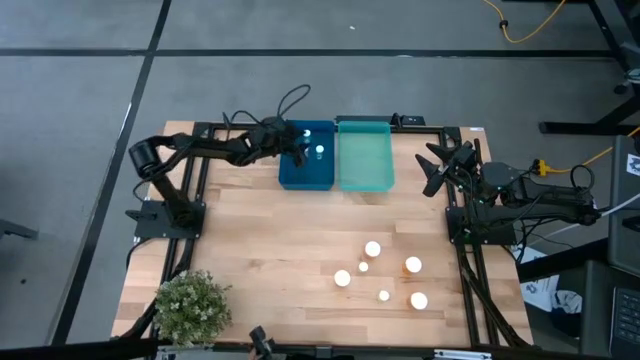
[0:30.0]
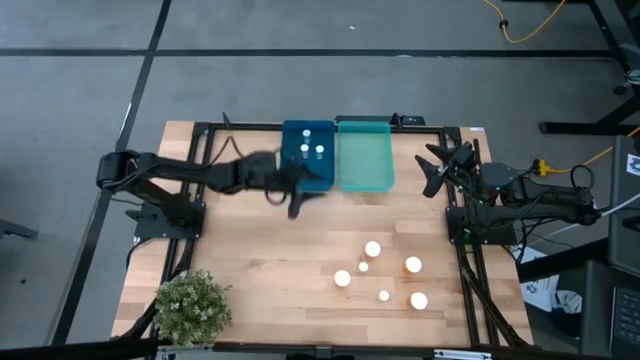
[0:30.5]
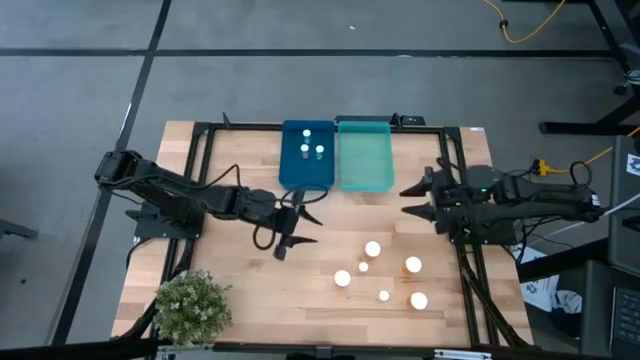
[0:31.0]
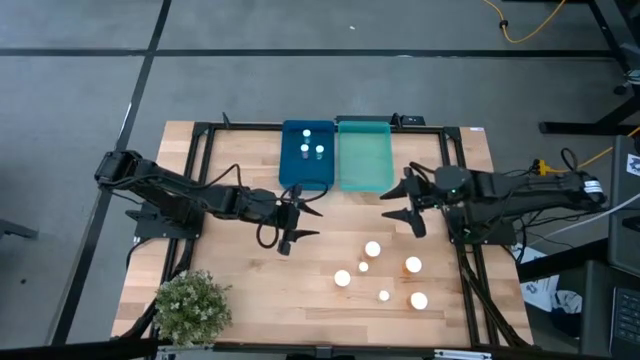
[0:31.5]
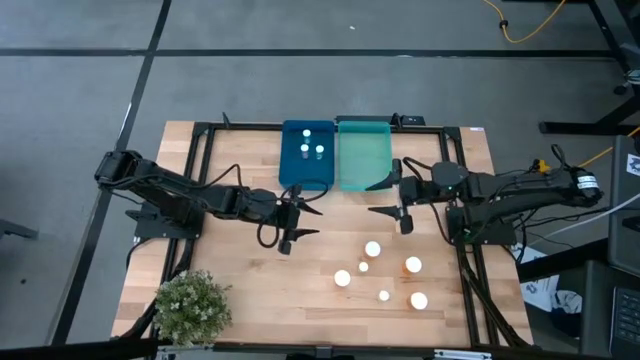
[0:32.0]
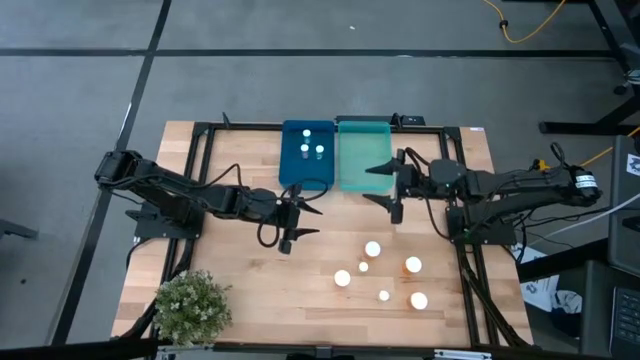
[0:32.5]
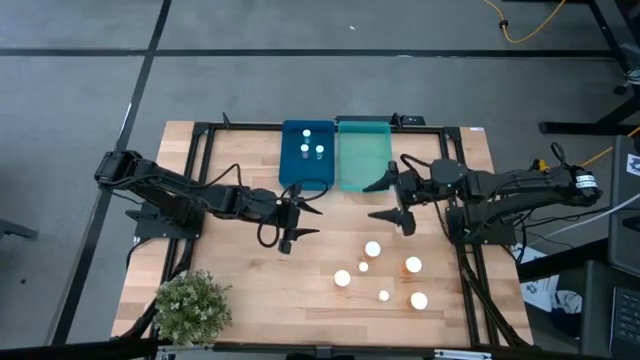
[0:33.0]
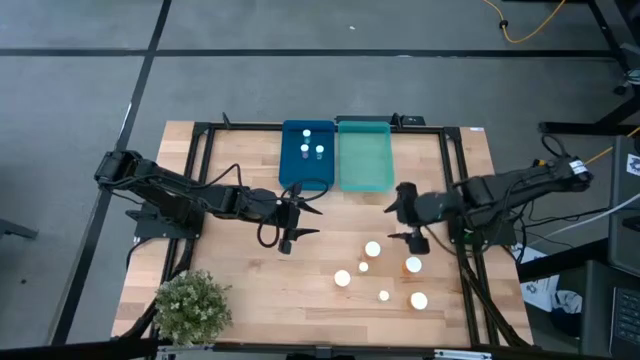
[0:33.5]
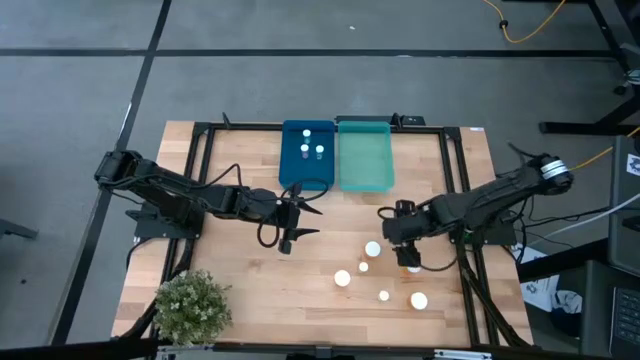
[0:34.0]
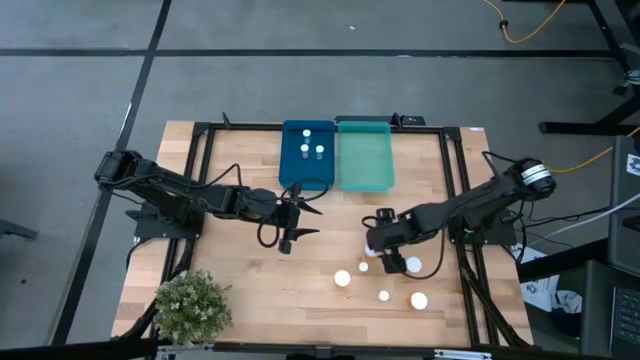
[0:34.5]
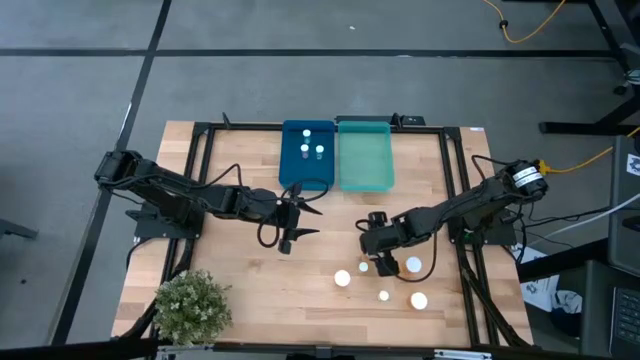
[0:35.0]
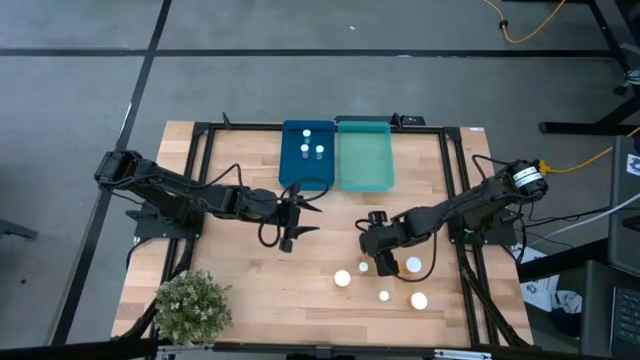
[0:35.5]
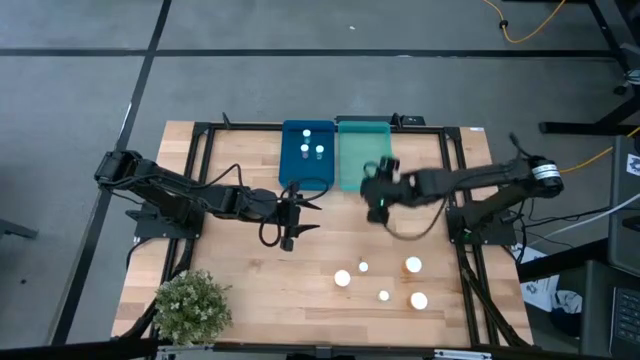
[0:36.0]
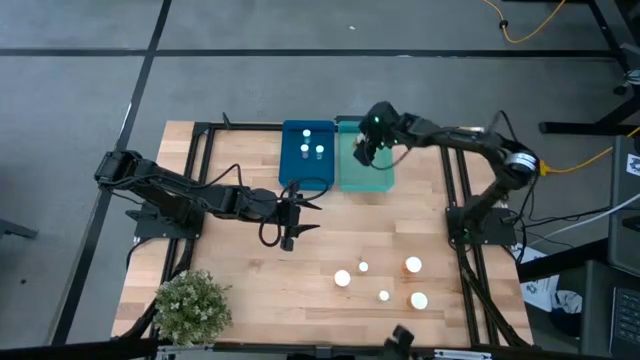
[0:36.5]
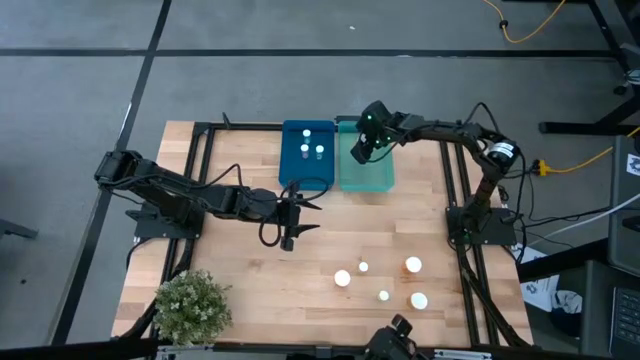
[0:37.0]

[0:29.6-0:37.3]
Task: Pick and place medicine bottles into bin by pill shape (circle, oval)
Put the orange pill bottle into the light blue bin

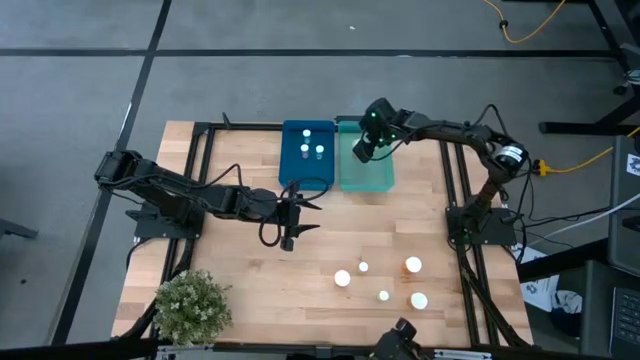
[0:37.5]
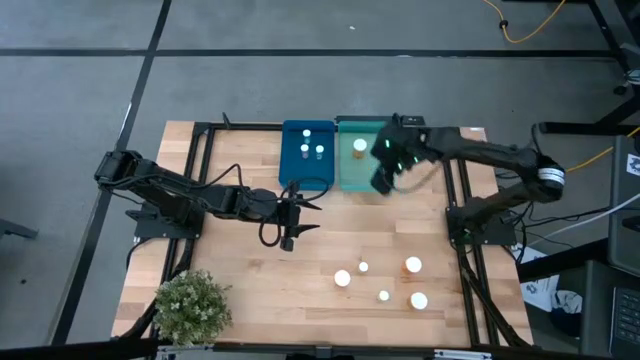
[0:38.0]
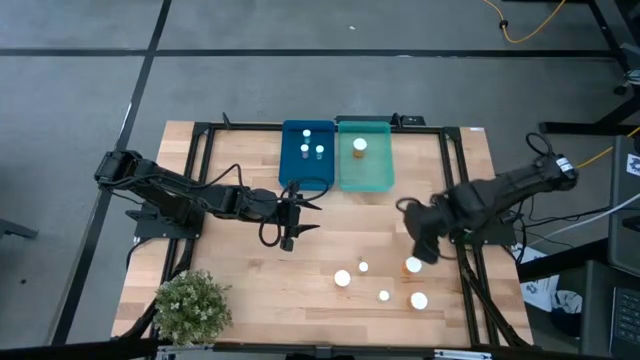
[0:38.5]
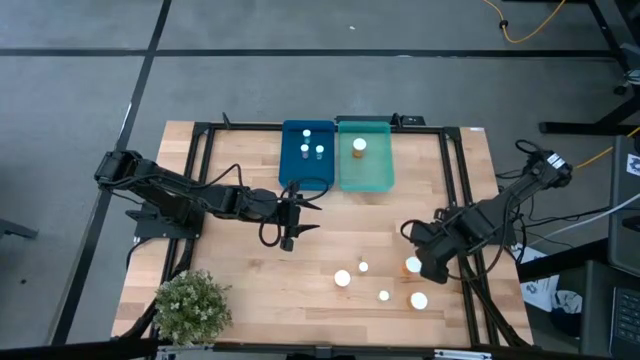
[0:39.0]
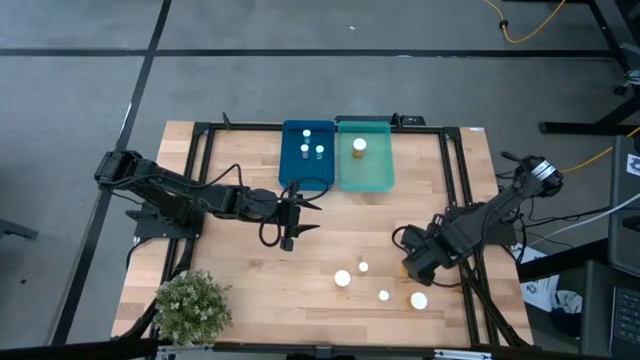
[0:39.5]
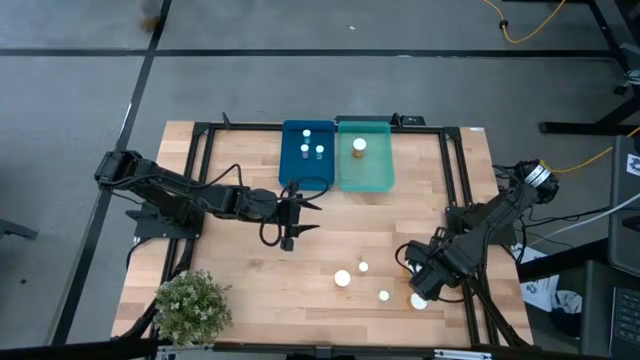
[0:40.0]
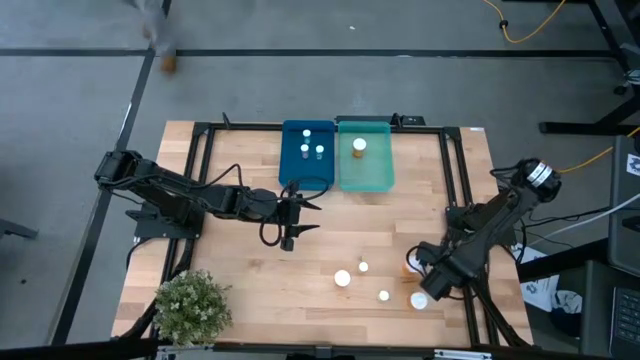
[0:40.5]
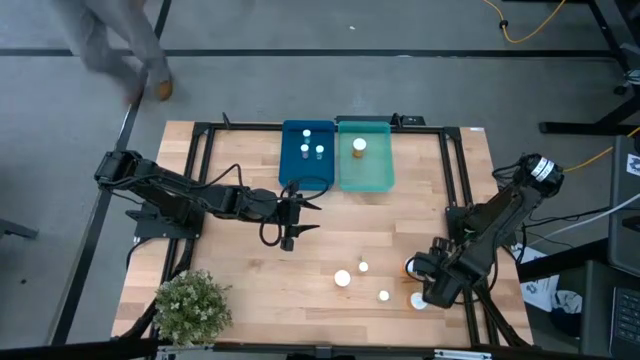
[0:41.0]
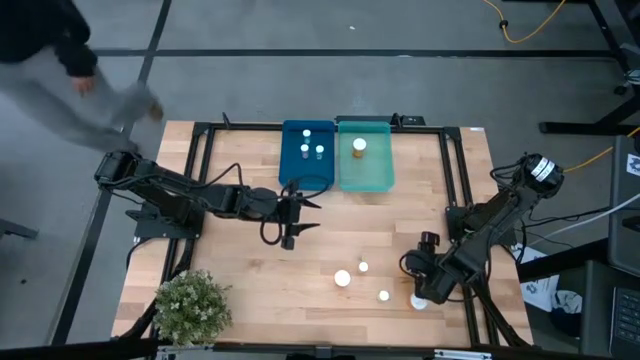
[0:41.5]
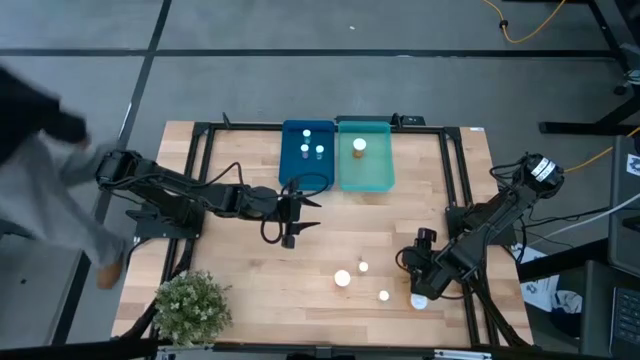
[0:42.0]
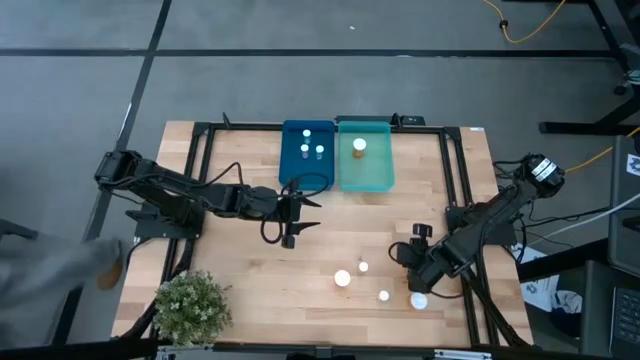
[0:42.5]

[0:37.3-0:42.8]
Put the orange pill bottle into the light blue bin

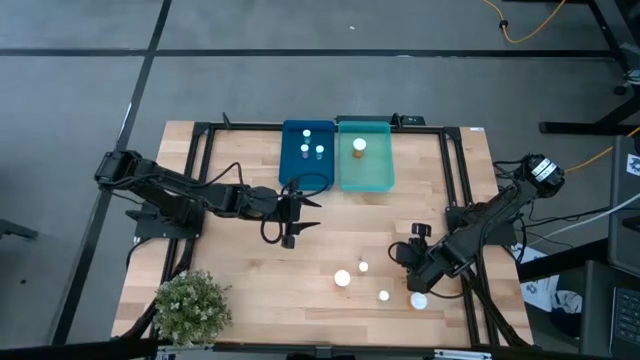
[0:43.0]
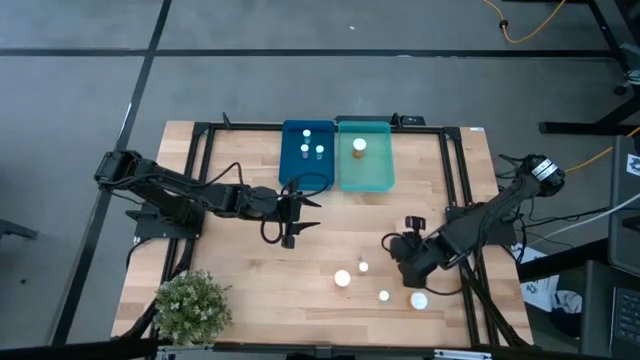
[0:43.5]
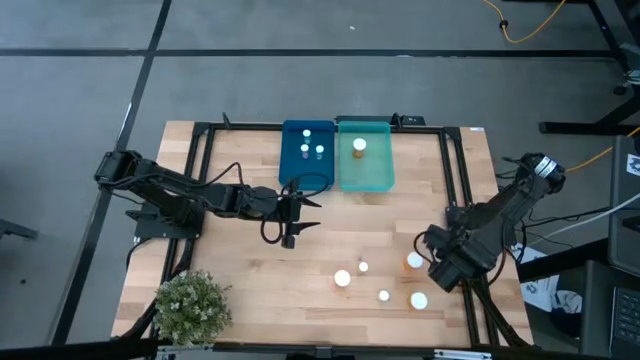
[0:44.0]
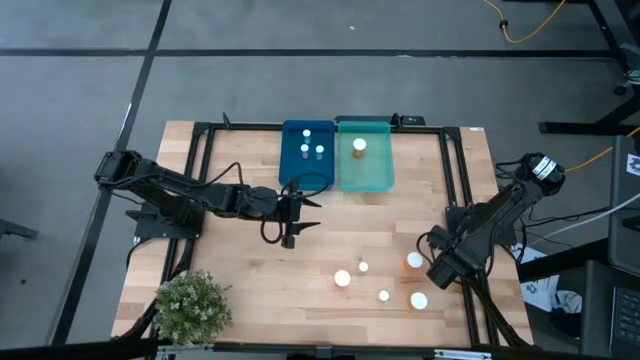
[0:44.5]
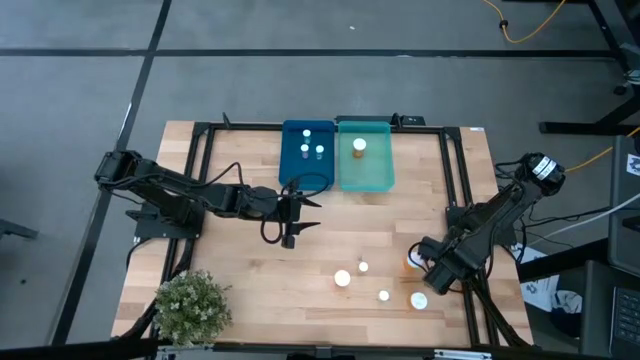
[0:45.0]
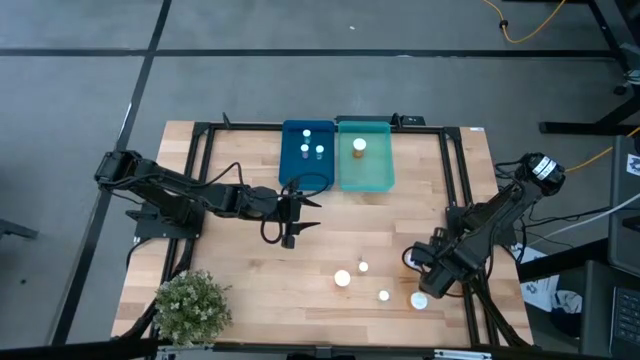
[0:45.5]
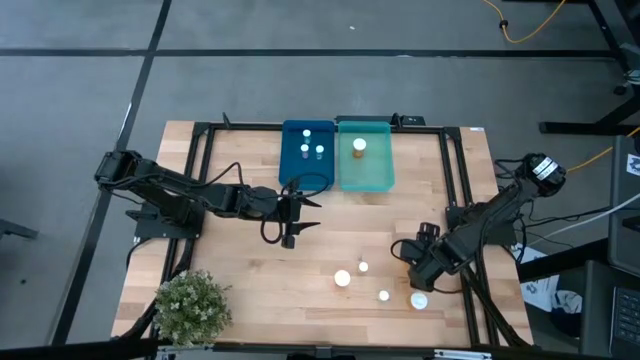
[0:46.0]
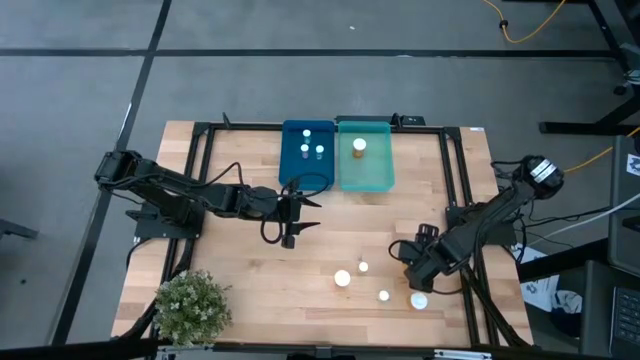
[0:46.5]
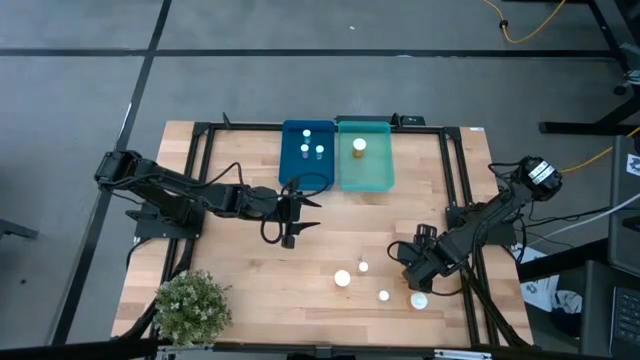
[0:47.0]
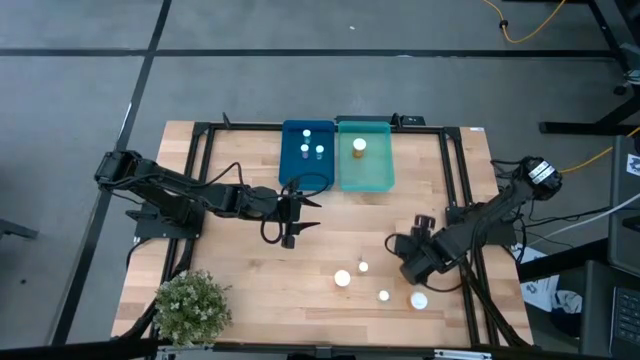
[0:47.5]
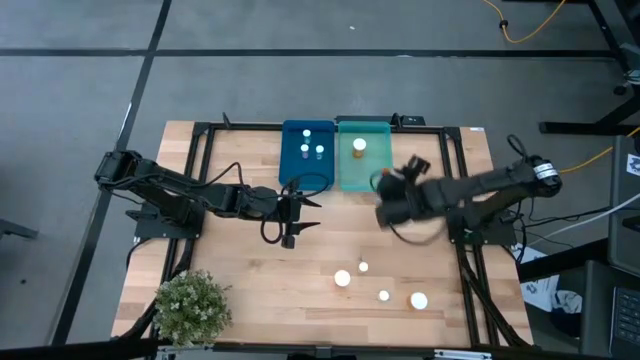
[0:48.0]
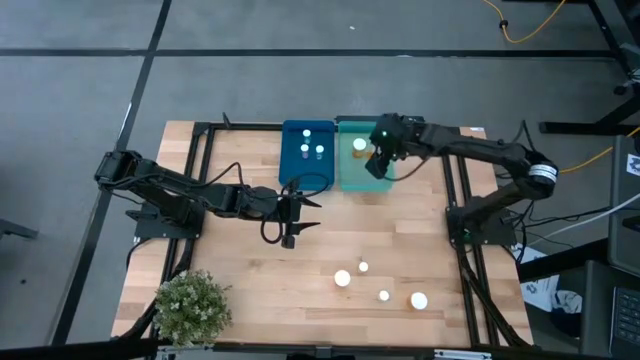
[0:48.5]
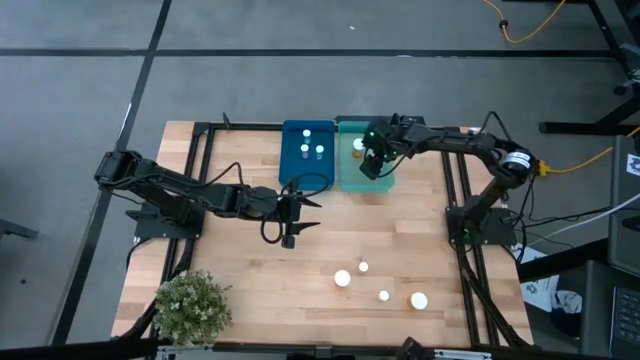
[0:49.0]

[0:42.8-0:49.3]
Put the orange pill bottle into the light blue bin

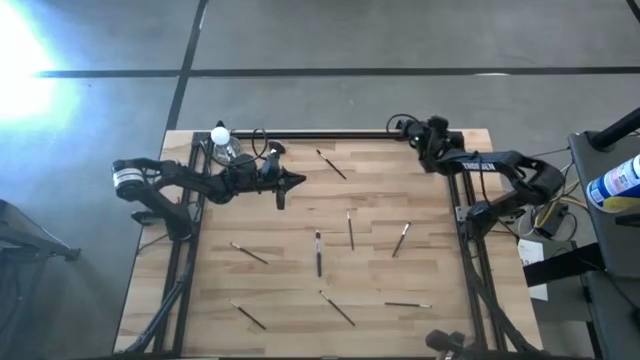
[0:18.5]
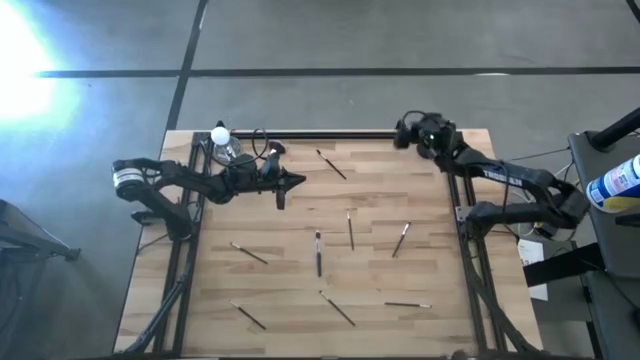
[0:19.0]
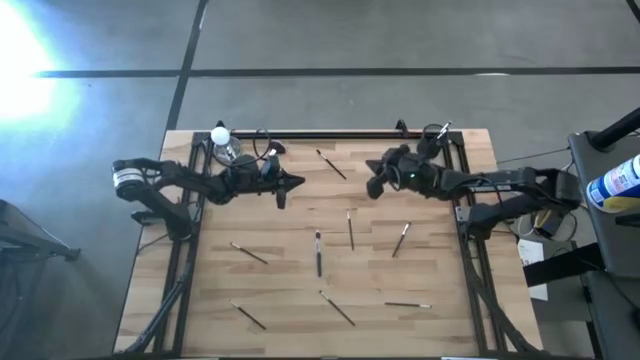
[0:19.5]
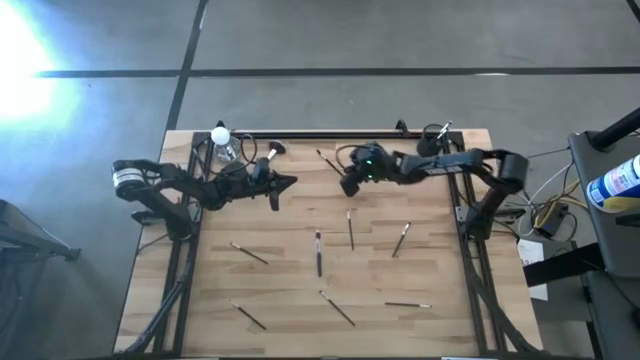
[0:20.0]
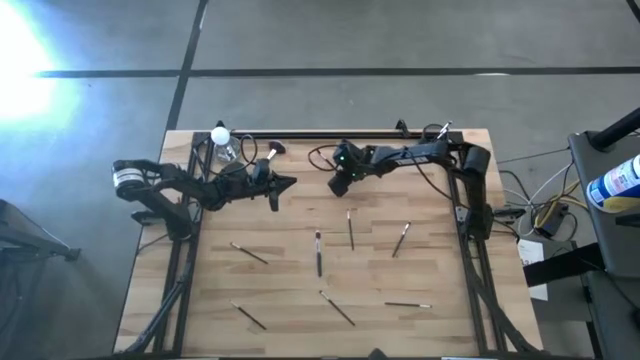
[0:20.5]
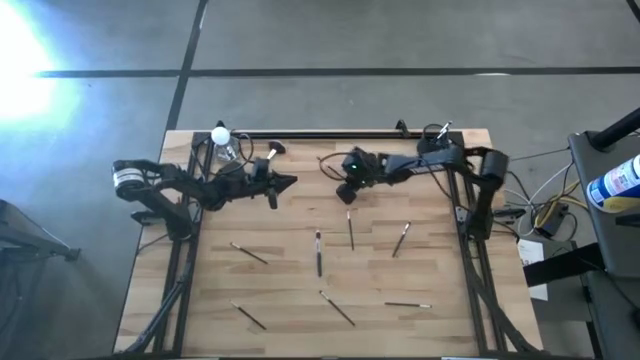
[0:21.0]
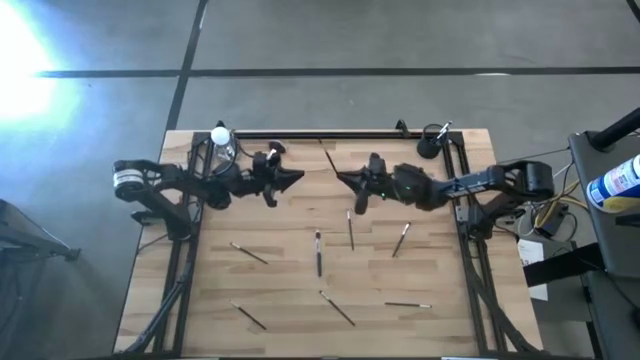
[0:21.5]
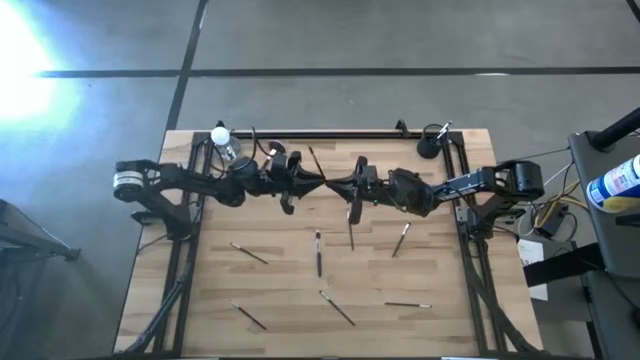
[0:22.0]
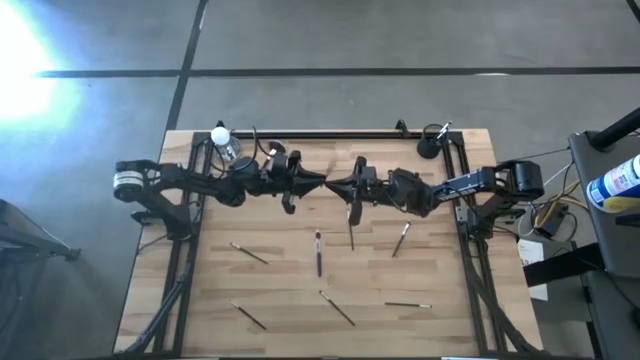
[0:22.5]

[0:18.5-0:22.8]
Task: Put items in baskets/containers
Put the brow brush into the mesh organizer
